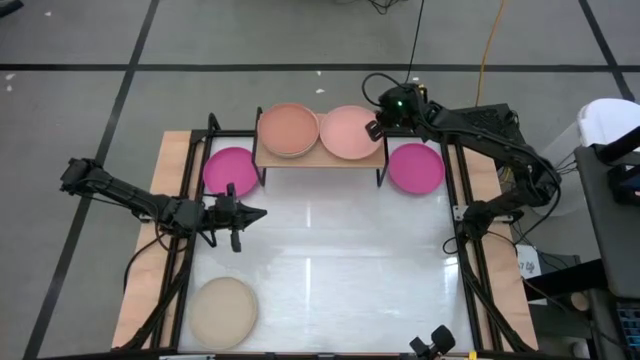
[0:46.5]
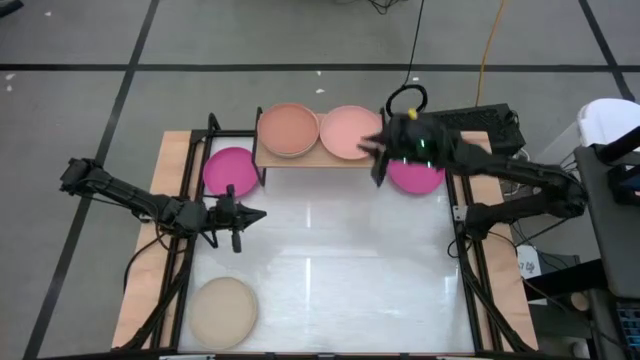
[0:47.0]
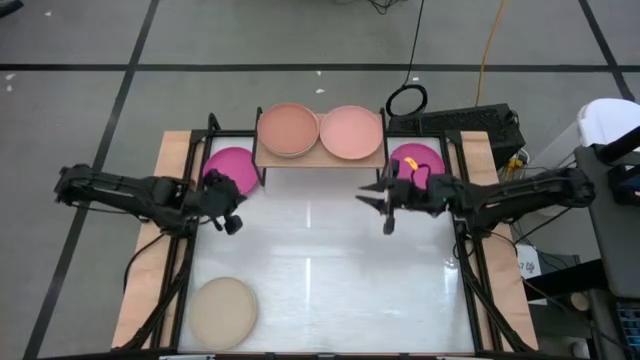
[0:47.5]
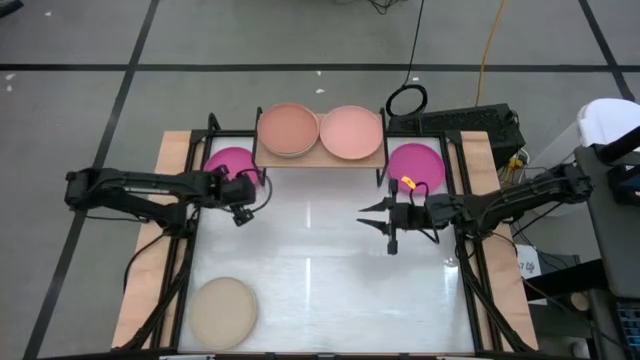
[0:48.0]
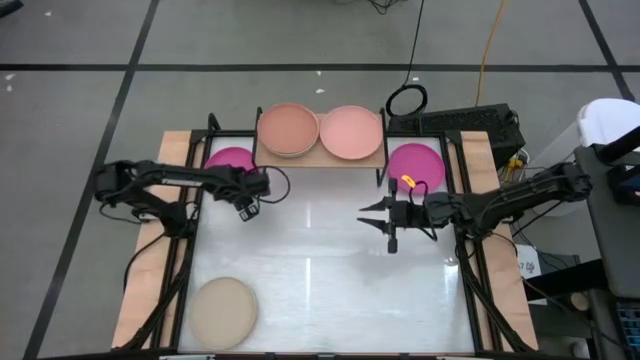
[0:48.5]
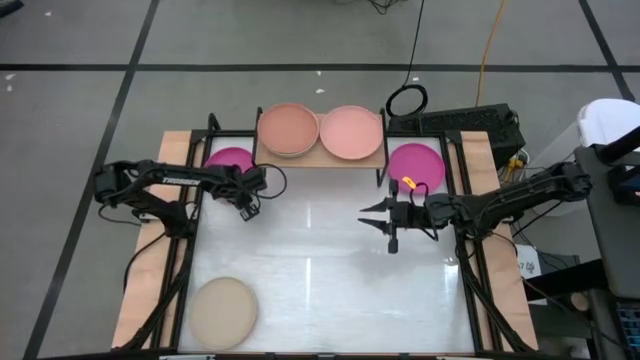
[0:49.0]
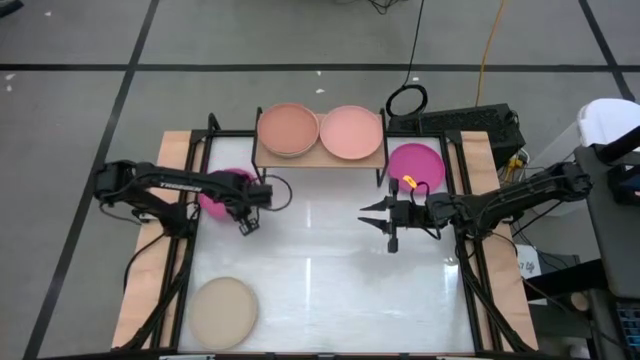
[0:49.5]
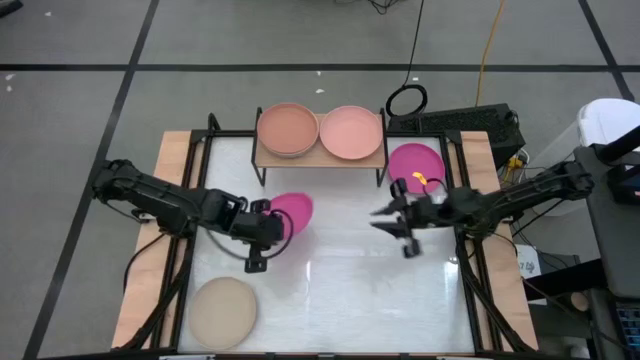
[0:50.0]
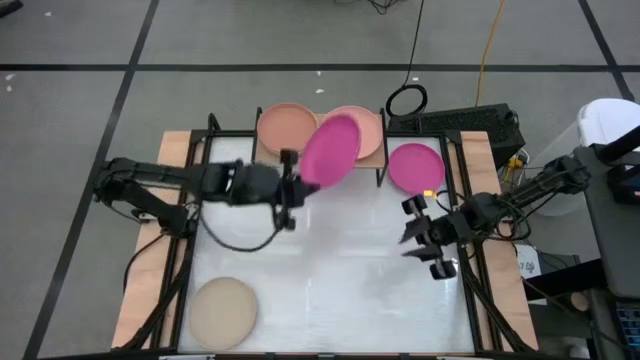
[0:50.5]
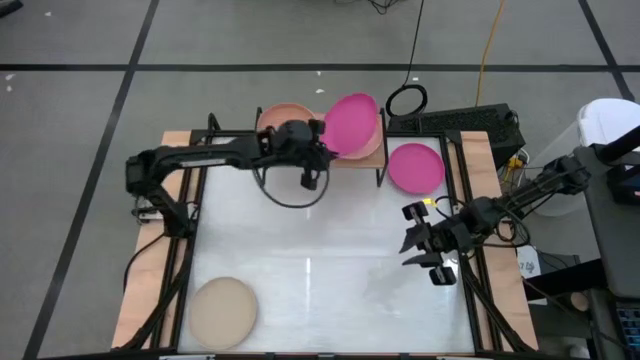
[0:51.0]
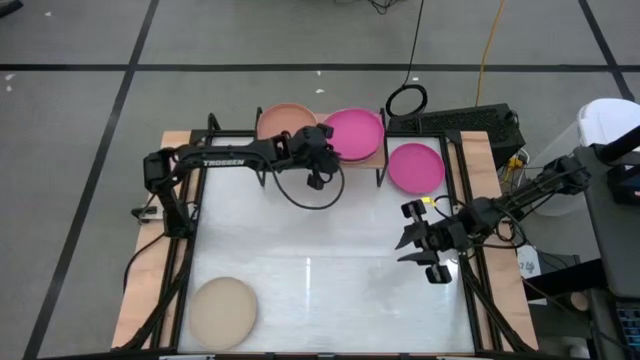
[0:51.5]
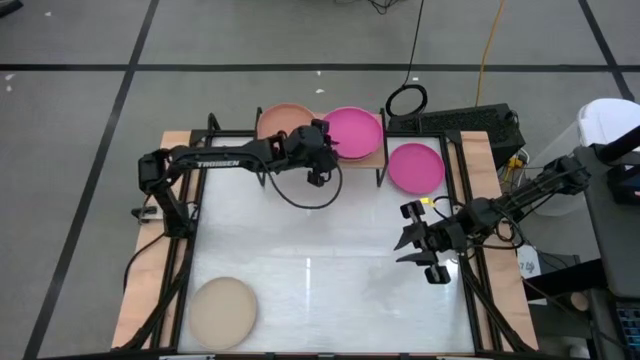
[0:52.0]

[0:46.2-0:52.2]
Task: Place and stack plates onto a shelf
Stack the left pink plate on top of the light brown plate on the shelf

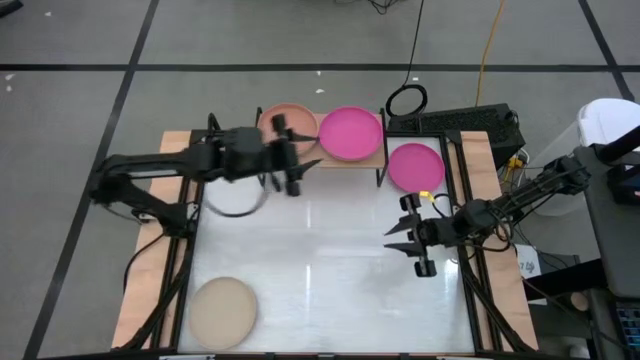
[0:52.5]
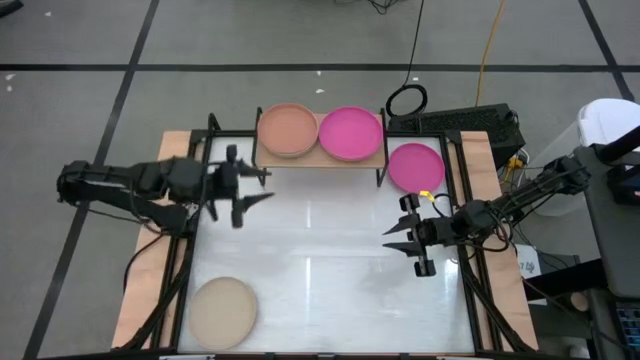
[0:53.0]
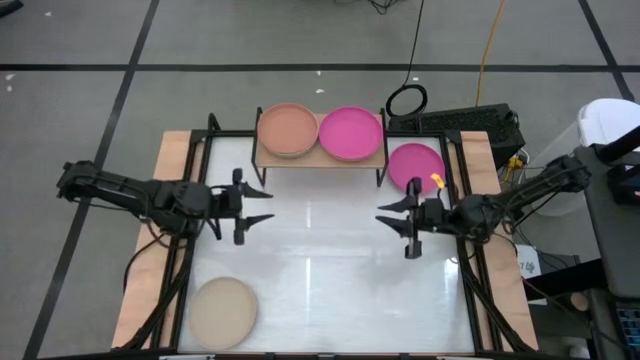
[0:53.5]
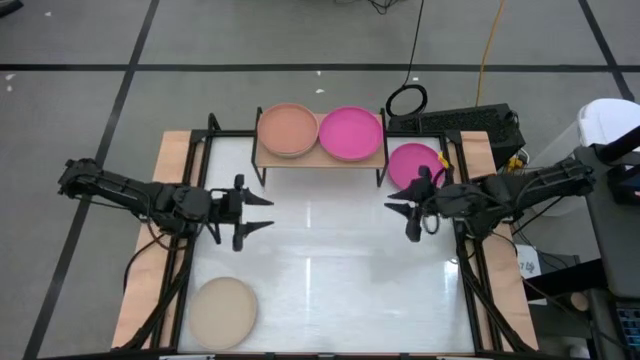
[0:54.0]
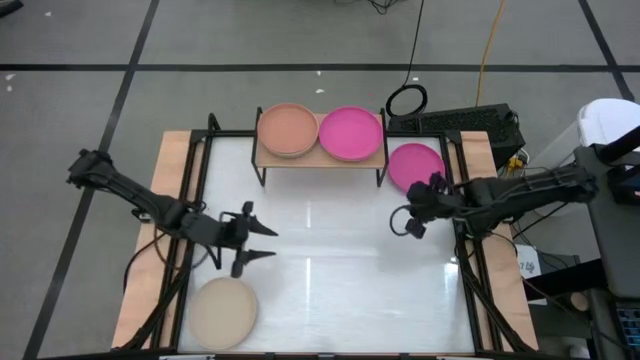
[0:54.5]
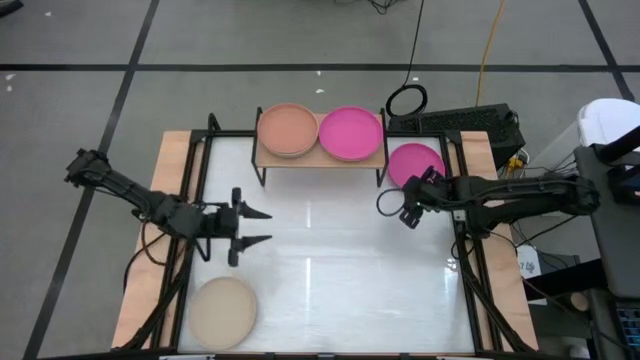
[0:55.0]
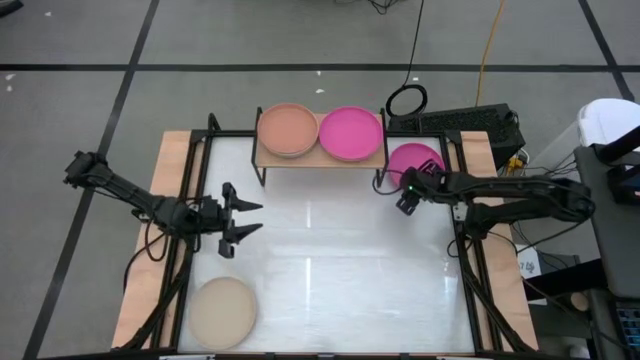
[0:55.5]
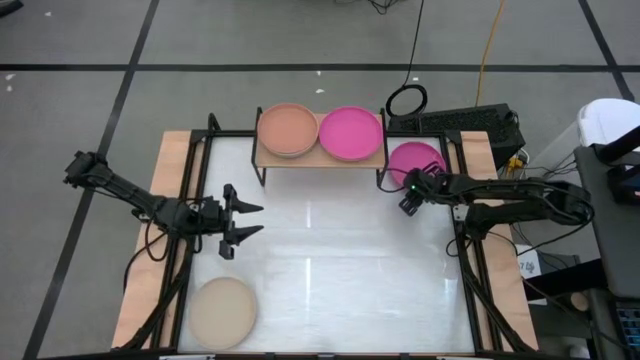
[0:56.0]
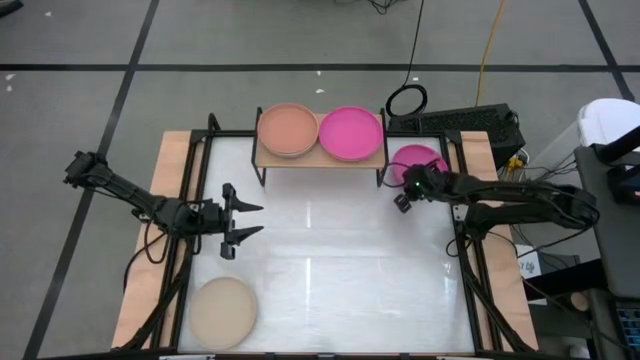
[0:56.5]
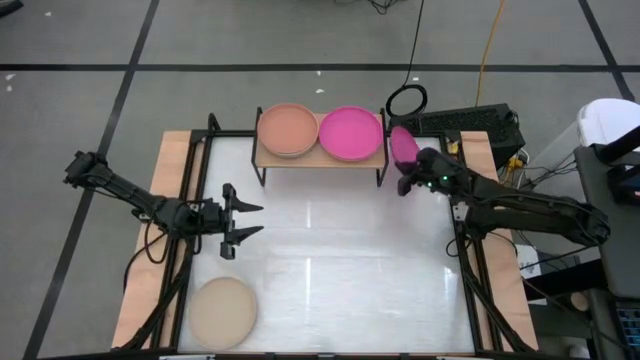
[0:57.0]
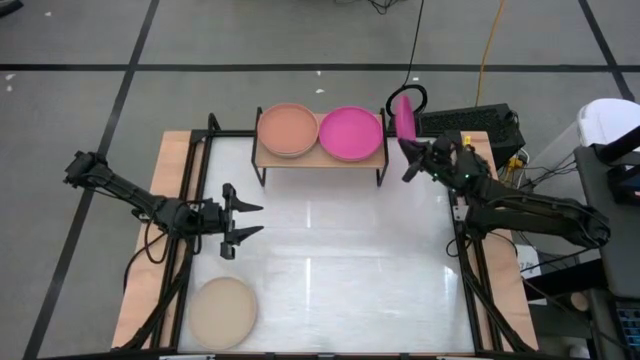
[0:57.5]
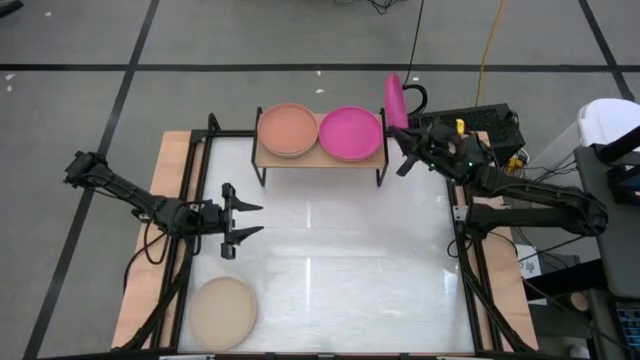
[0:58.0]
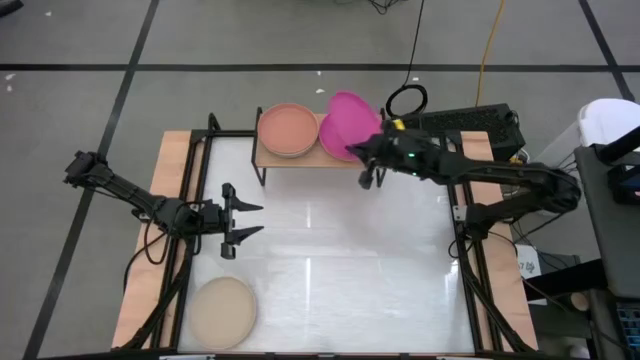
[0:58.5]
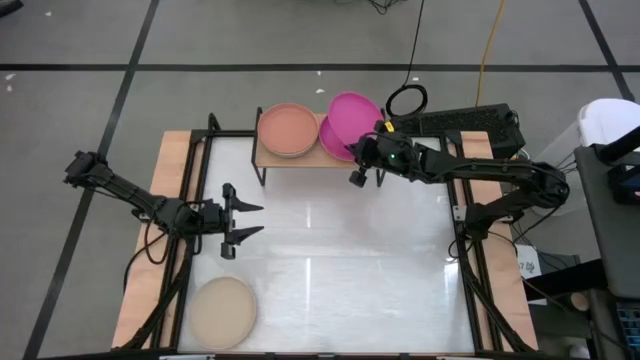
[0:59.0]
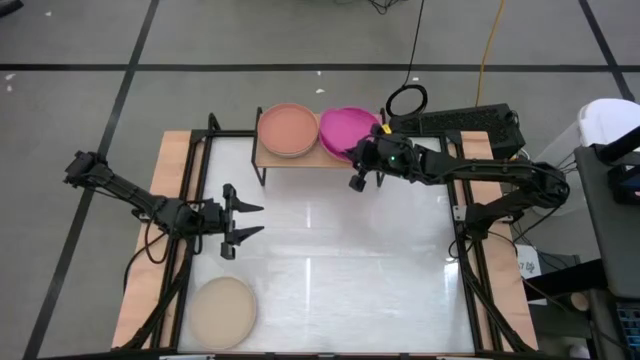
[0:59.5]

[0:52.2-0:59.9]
Stack the pink plate on top of the pink plate on the shelf

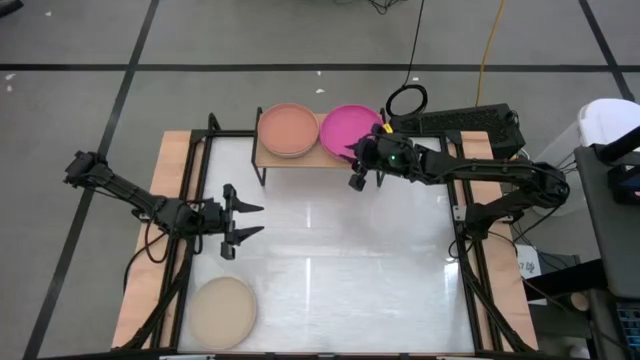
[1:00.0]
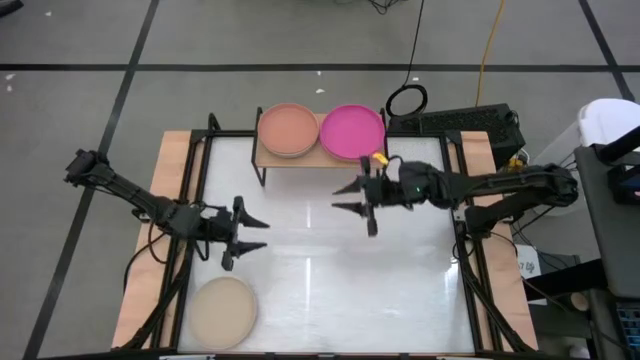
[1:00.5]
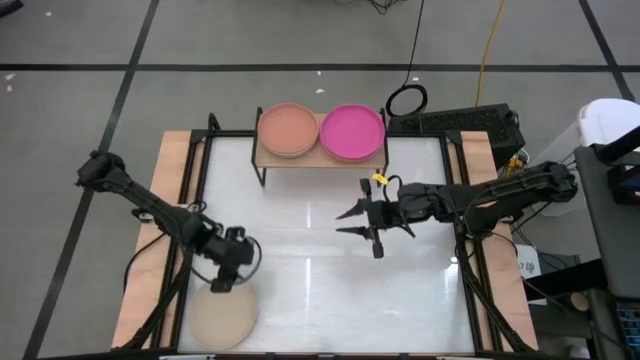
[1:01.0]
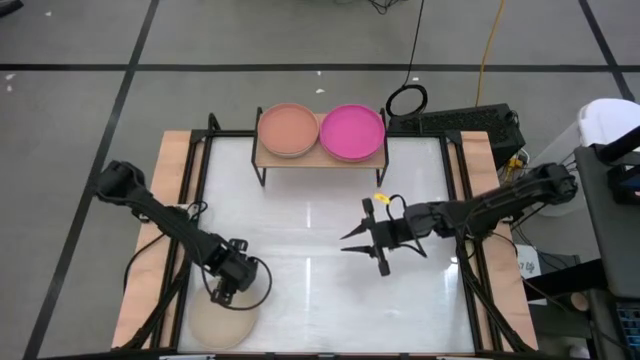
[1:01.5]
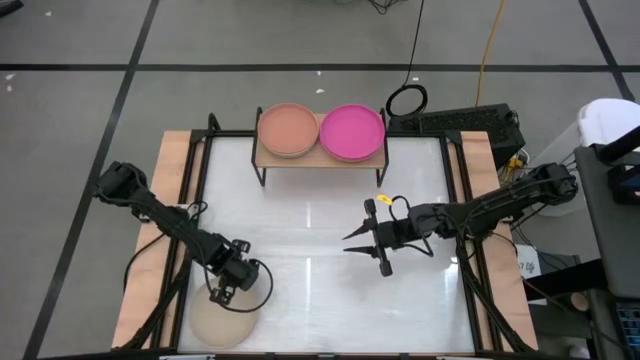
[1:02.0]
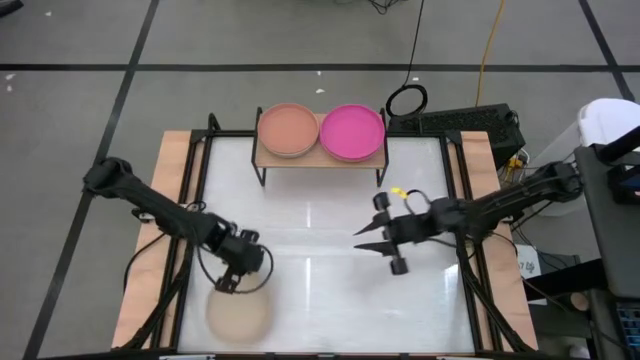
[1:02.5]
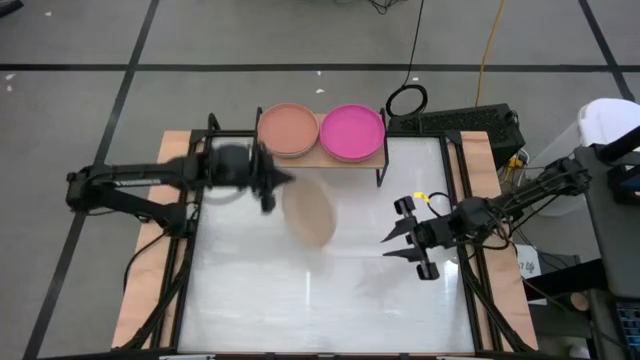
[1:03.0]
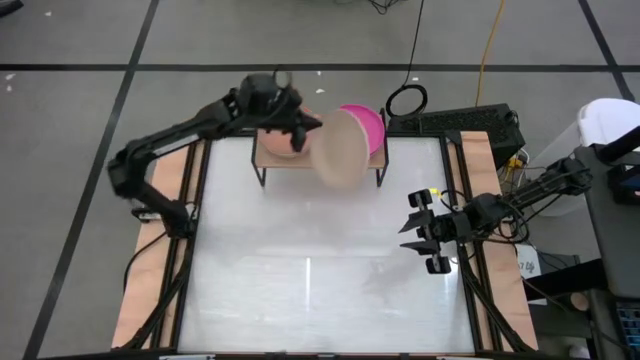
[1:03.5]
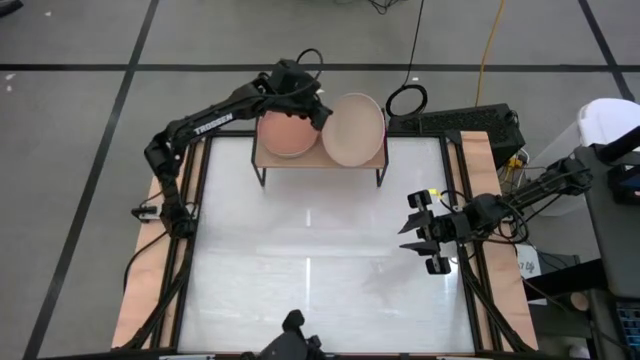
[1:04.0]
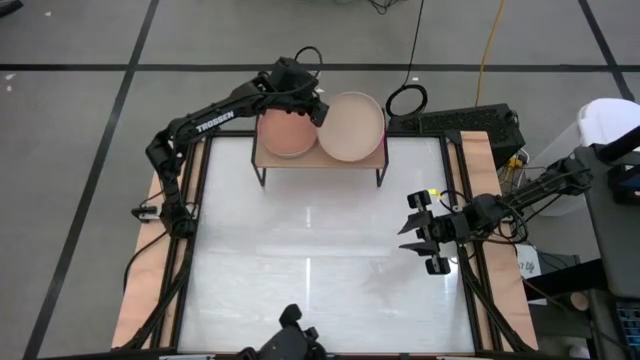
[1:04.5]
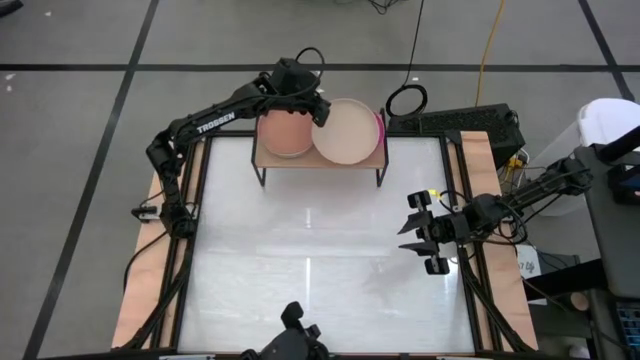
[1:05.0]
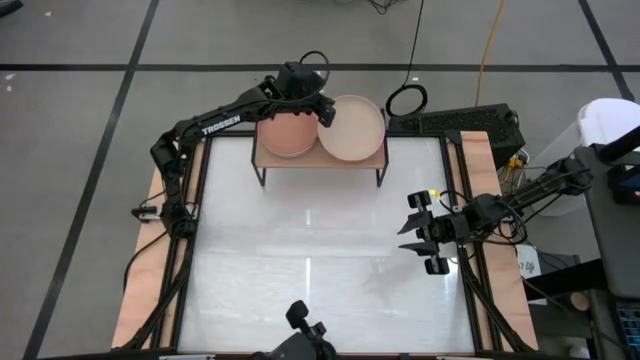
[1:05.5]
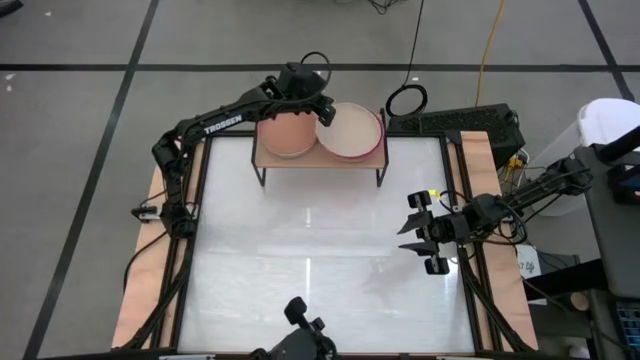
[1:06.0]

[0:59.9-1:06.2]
Stack the light gray plate on top of the pink plate on the shelf
